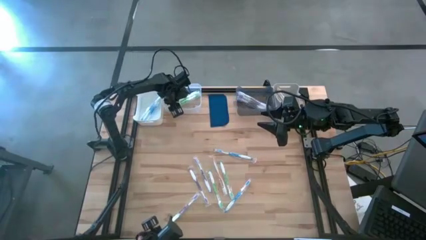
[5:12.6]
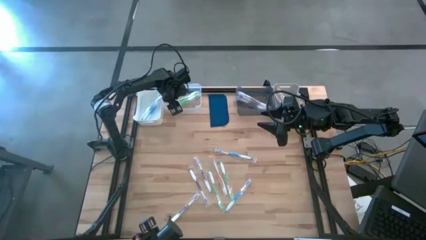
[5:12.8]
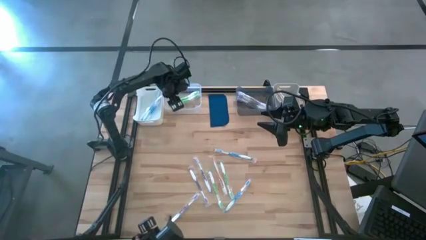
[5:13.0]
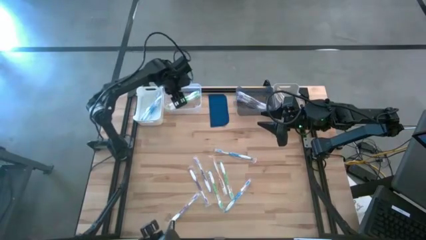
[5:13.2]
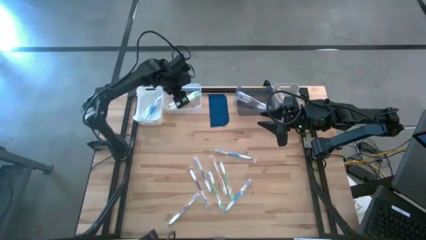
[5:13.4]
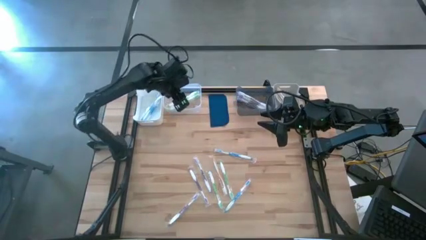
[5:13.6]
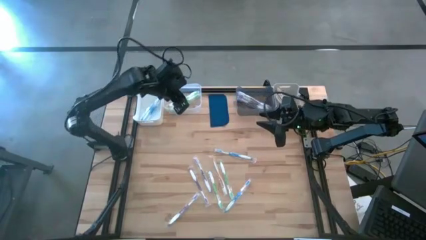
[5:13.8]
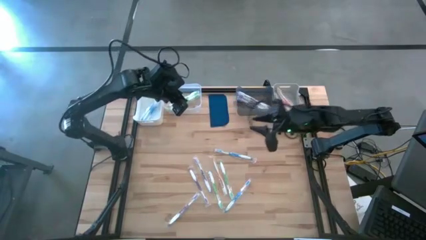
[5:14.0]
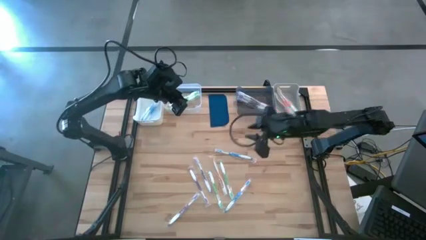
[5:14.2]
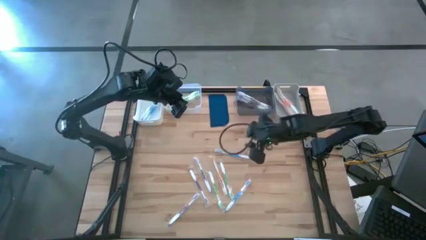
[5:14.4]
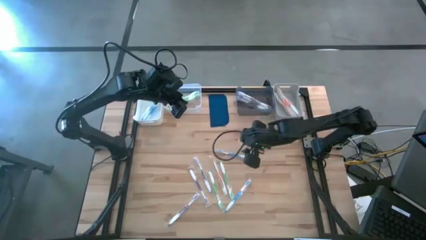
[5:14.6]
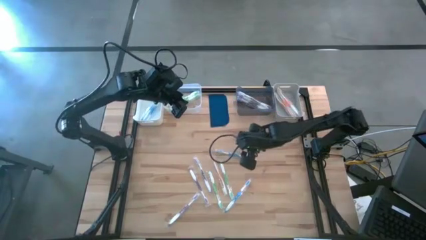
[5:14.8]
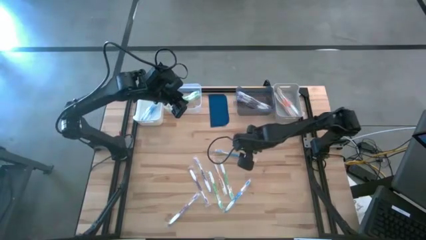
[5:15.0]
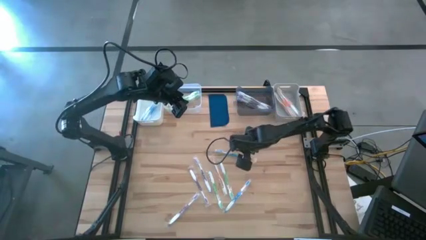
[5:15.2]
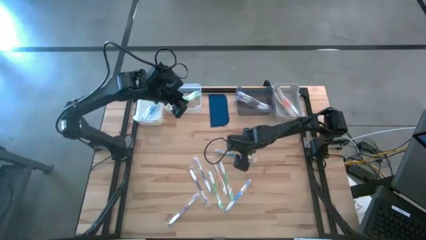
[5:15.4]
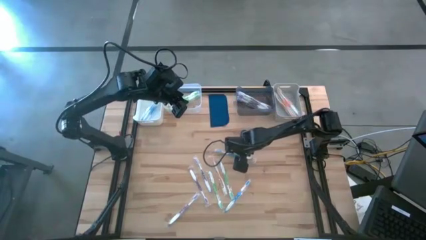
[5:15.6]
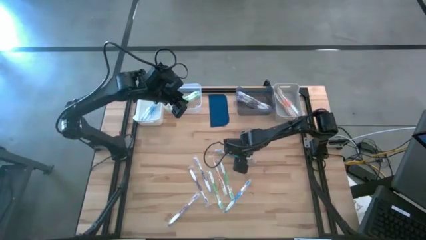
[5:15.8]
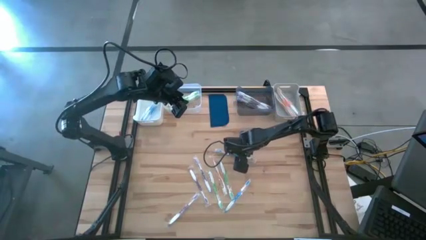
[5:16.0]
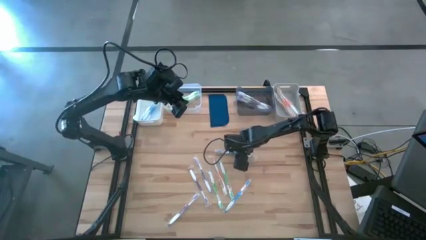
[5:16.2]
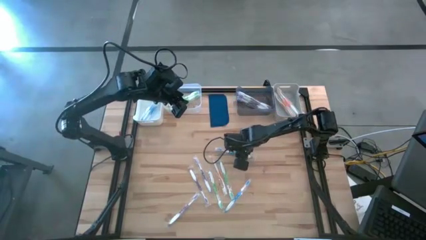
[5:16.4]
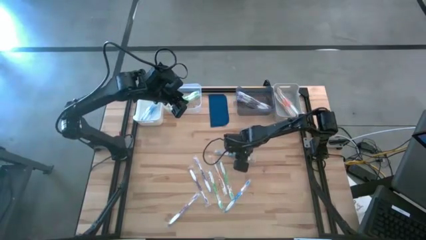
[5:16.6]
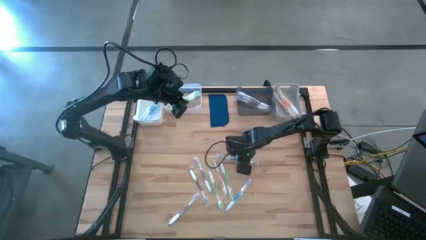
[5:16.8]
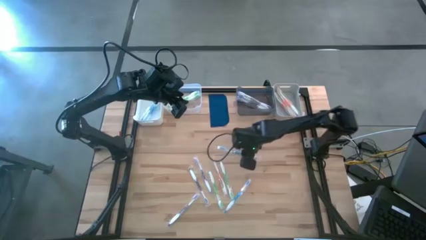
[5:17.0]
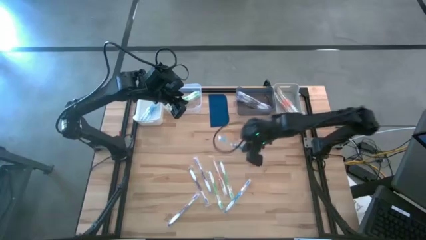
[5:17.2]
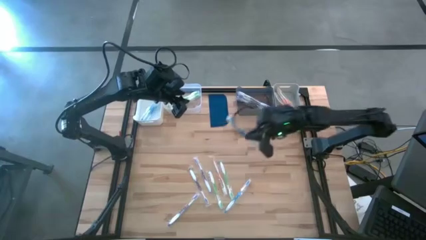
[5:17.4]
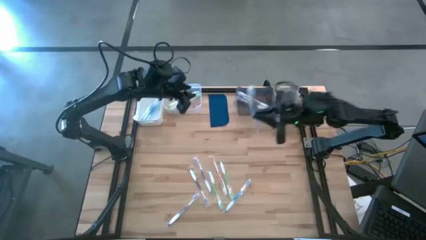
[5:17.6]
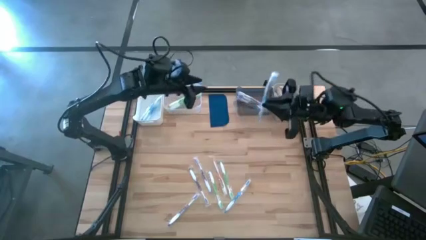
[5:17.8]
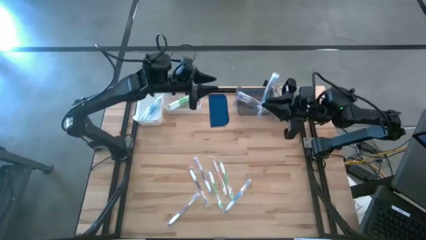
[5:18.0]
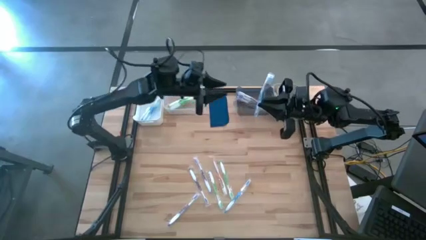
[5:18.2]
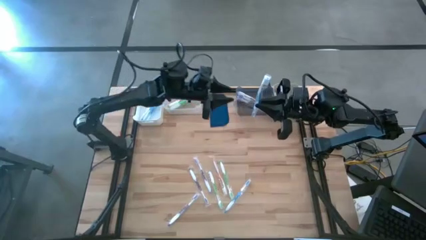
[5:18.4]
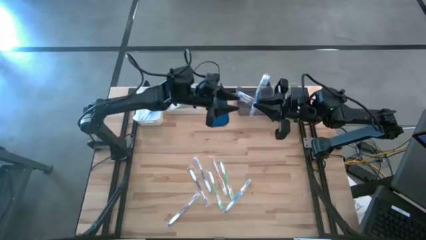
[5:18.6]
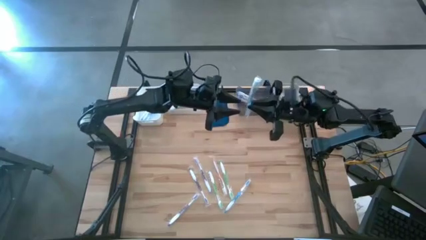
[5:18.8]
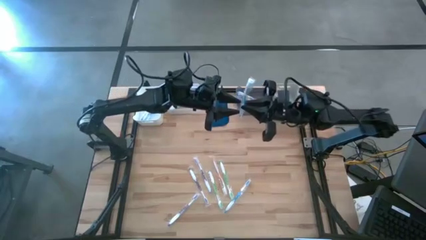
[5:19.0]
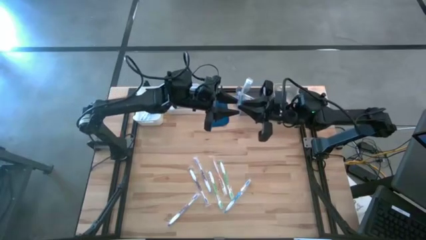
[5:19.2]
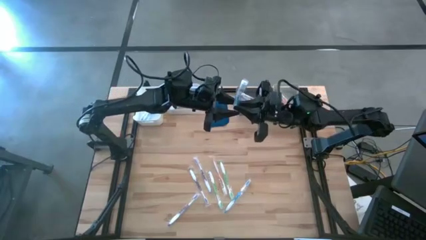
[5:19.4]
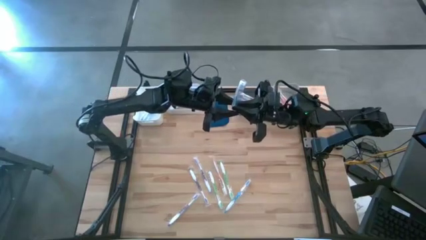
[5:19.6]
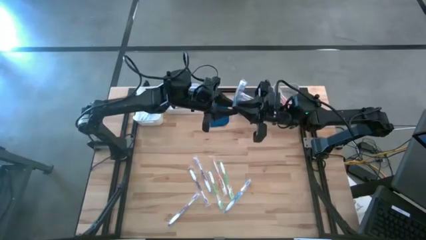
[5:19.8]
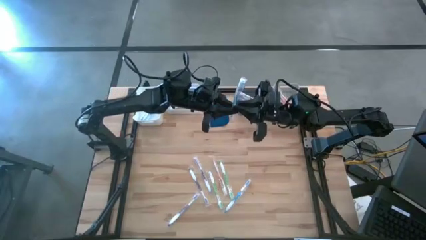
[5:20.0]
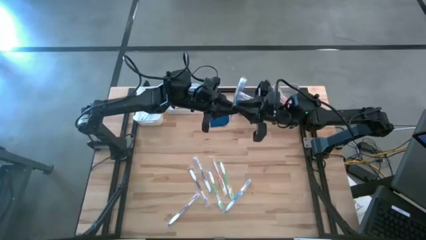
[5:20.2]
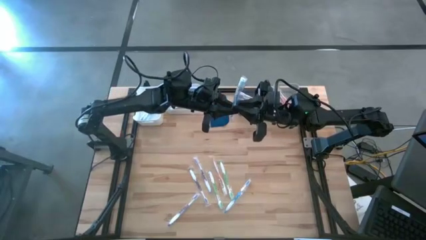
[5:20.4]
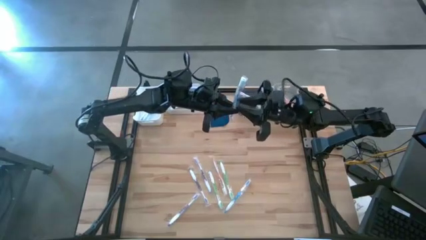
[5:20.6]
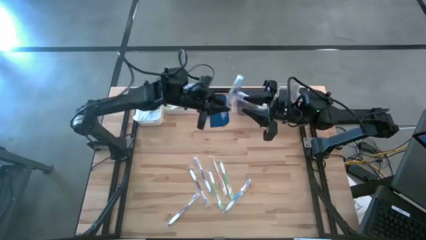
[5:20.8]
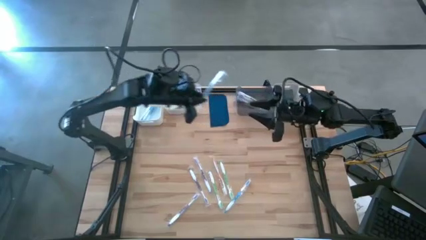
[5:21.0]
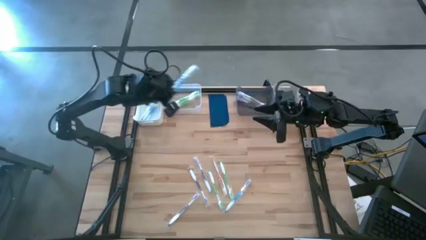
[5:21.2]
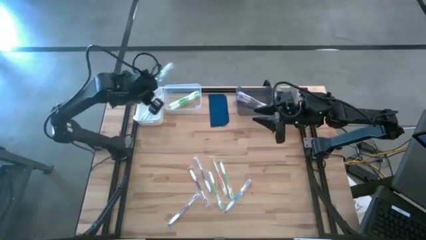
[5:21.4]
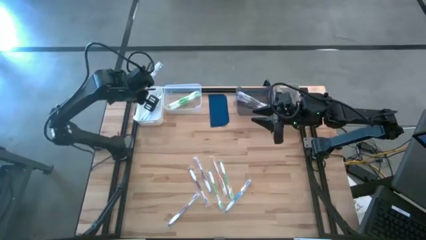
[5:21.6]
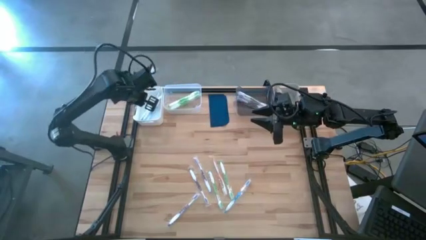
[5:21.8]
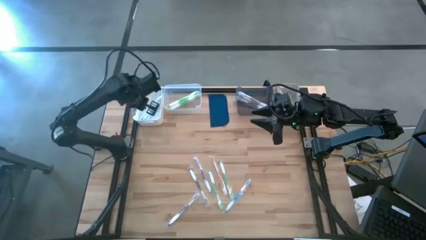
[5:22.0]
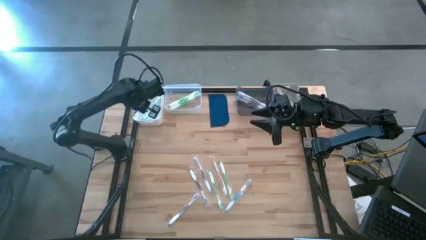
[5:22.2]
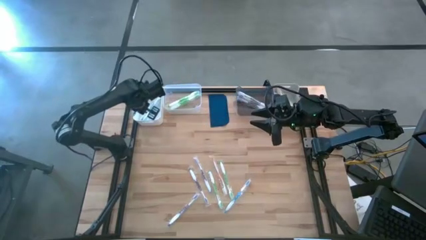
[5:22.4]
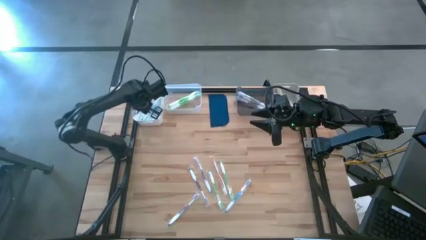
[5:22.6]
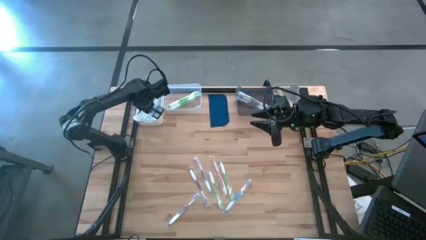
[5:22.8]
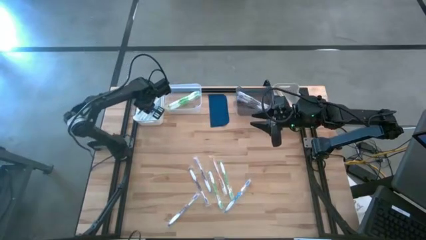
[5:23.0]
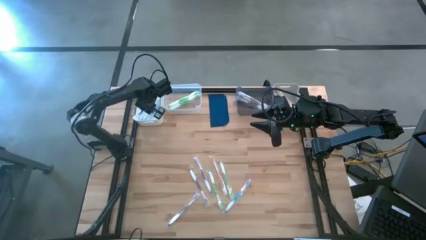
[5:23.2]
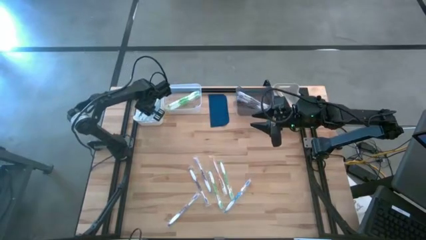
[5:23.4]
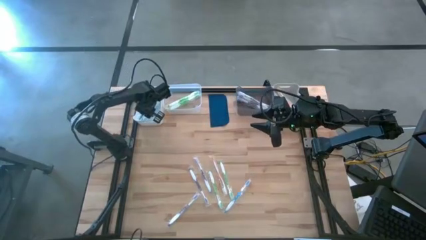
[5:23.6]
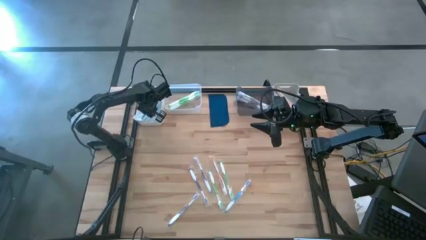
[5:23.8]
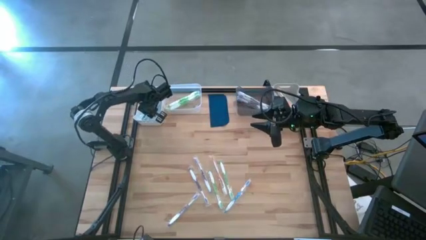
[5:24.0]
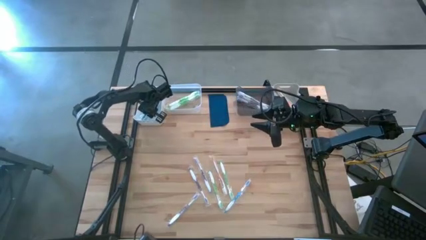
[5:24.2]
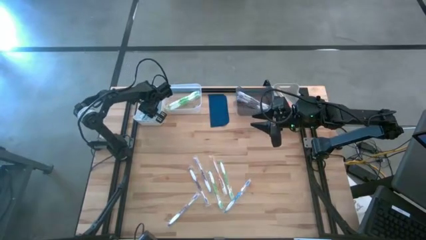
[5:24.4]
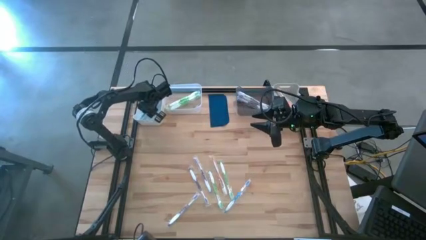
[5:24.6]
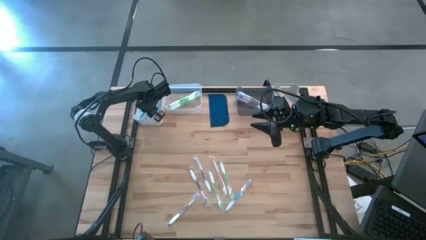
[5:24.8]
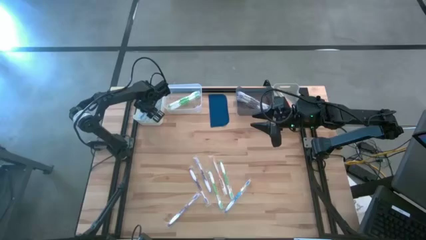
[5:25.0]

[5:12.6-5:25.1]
Task: Pick & Place Toothbrushes
Put the blue toothbrush into the white bin

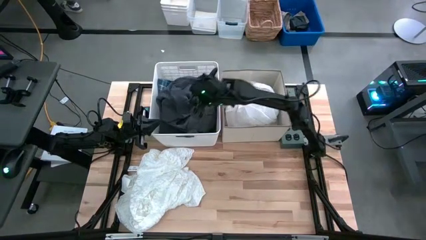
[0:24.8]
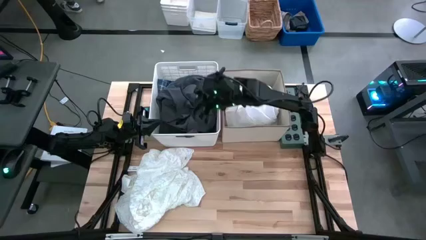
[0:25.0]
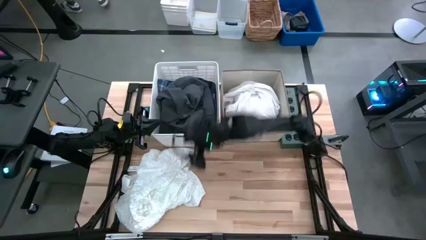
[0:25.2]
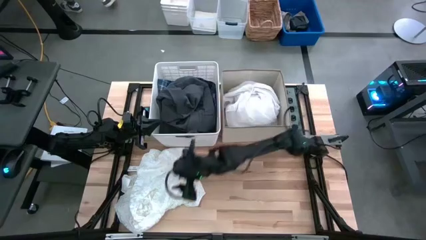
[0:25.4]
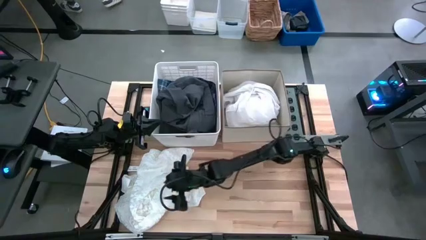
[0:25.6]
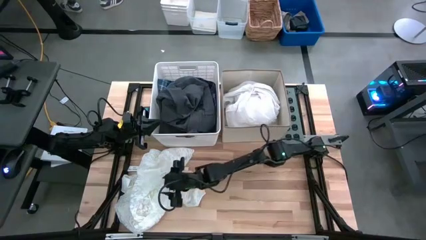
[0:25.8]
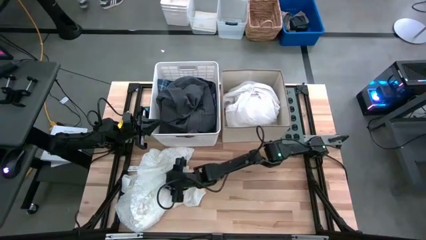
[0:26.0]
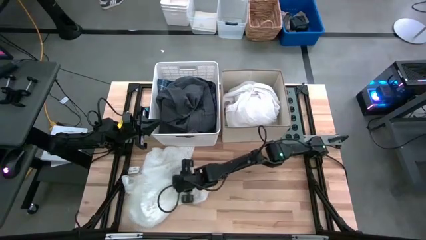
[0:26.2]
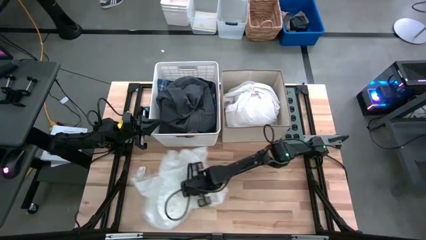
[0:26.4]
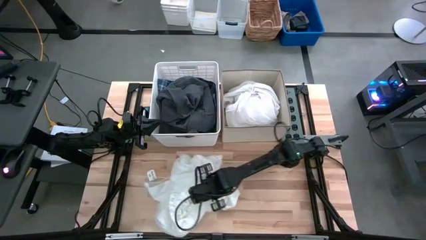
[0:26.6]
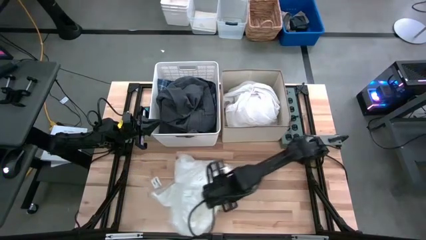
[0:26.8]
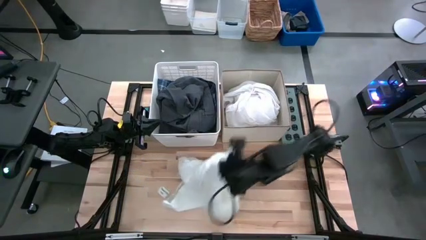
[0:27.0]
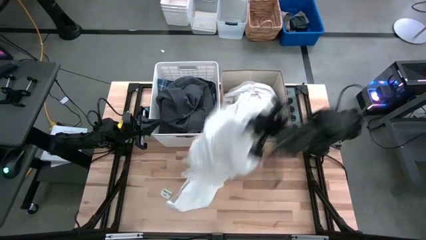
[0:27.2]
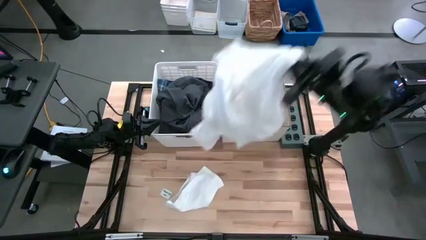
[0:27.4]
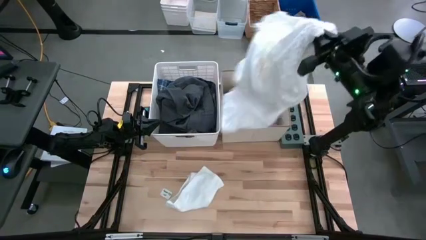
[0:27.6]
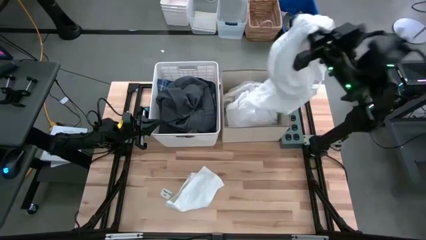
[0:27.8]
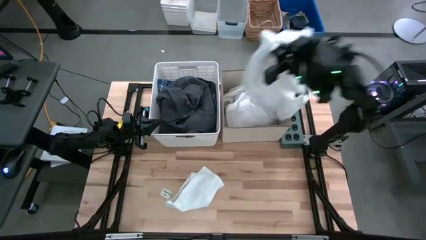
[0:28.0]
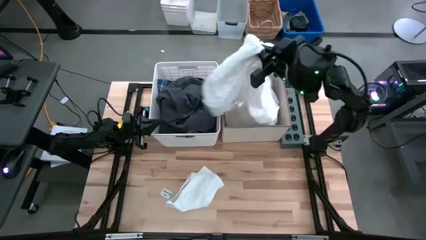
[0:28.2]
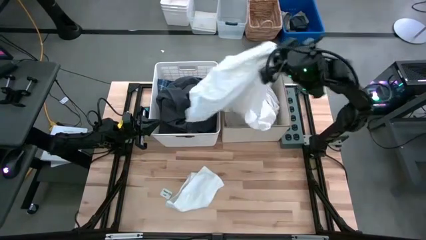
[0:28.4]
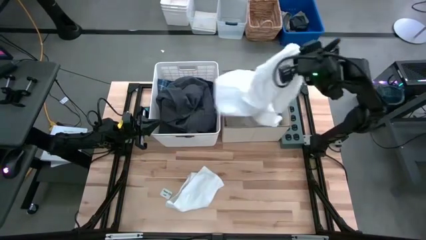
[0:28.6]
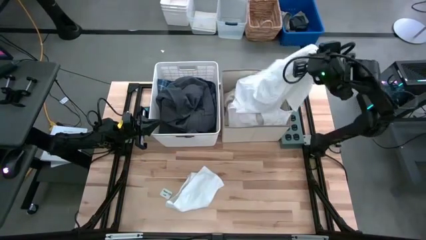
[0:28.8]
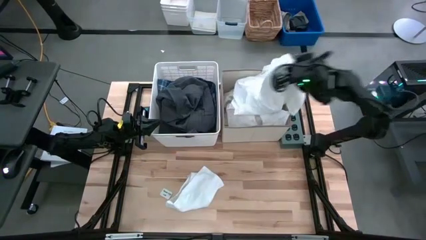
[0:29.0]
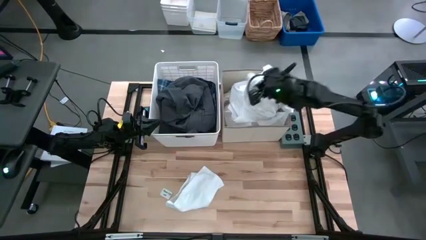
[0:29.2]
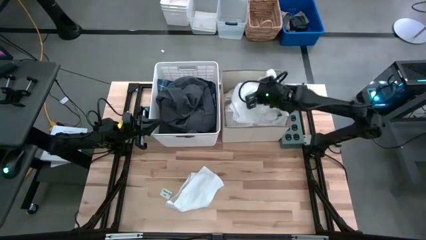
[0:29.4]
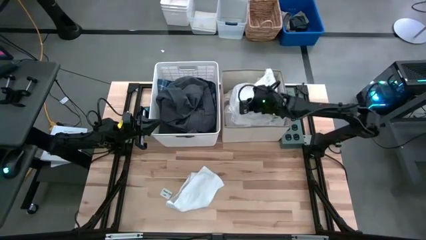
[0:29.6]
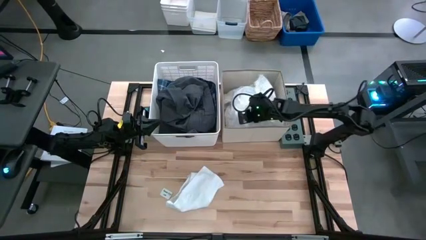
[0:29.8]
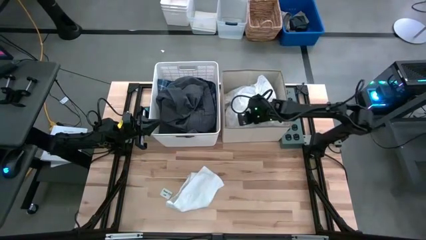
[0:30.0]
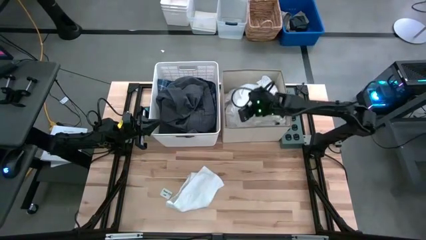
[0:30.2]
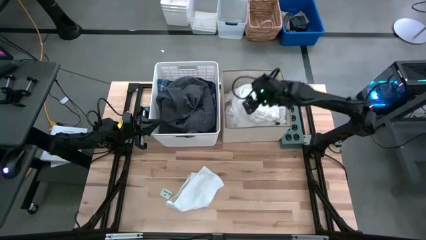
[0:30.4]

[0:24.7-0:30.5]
Task: Sort clothes
Put the white shirt into the laundry organizer
